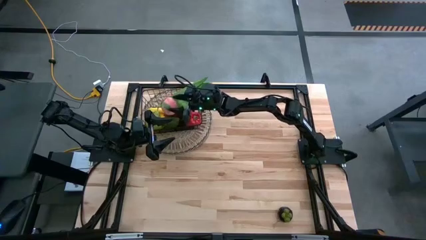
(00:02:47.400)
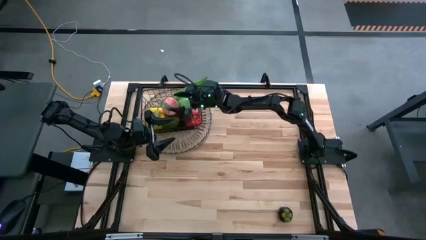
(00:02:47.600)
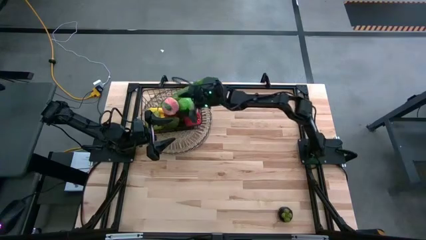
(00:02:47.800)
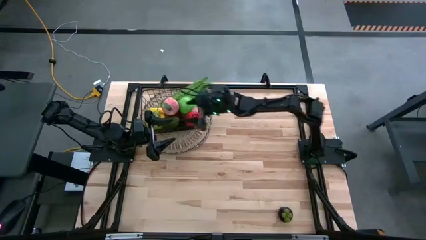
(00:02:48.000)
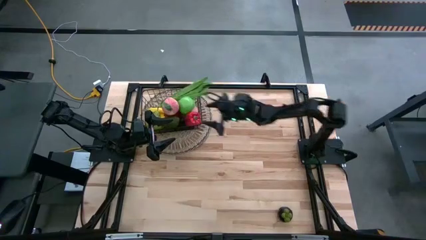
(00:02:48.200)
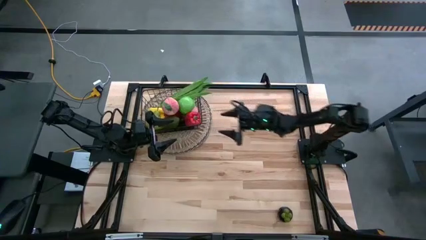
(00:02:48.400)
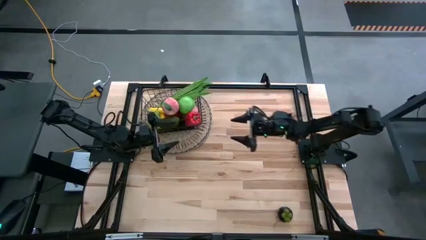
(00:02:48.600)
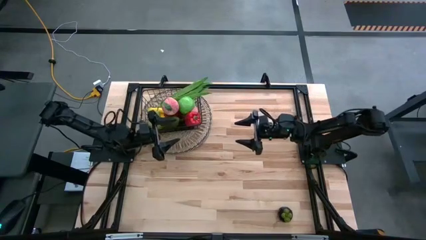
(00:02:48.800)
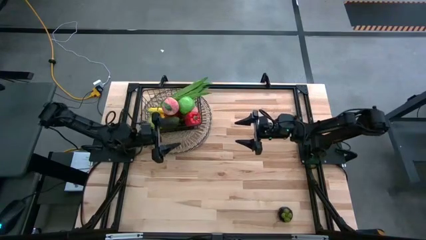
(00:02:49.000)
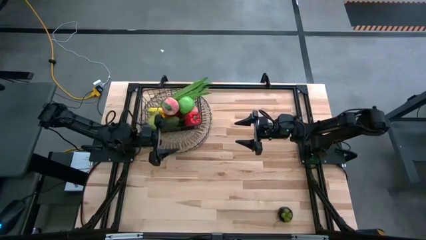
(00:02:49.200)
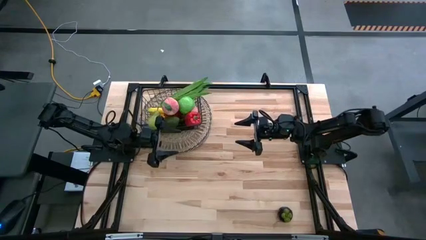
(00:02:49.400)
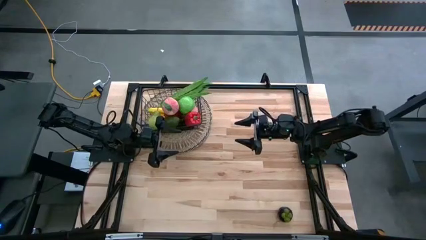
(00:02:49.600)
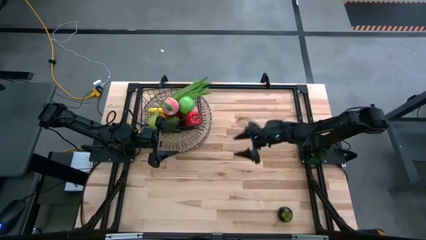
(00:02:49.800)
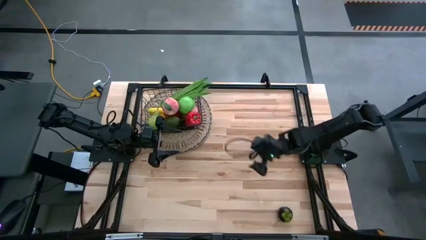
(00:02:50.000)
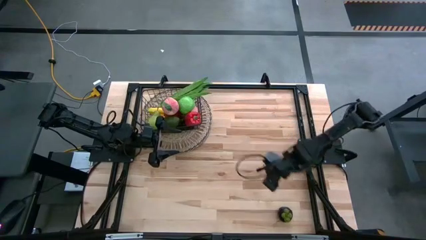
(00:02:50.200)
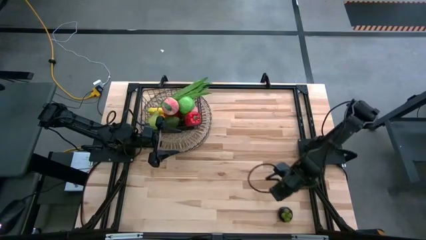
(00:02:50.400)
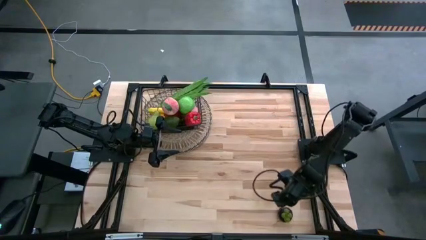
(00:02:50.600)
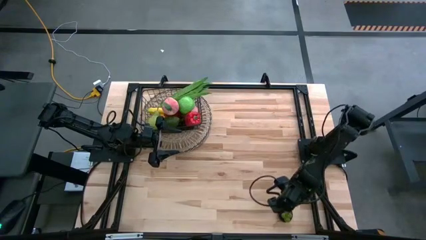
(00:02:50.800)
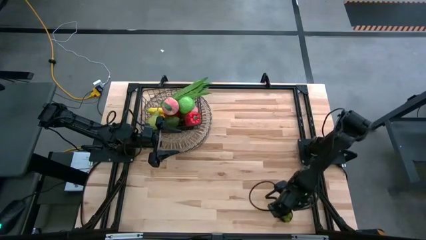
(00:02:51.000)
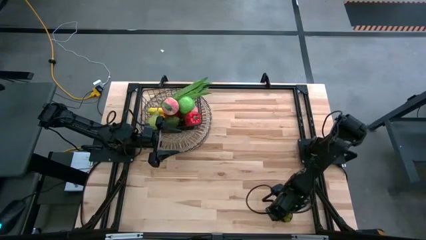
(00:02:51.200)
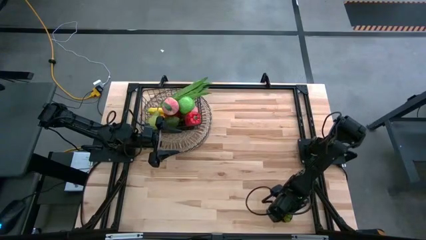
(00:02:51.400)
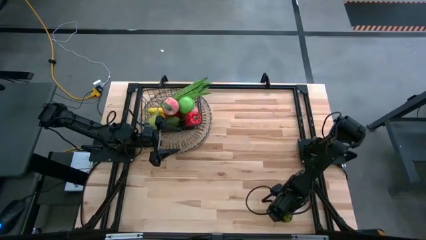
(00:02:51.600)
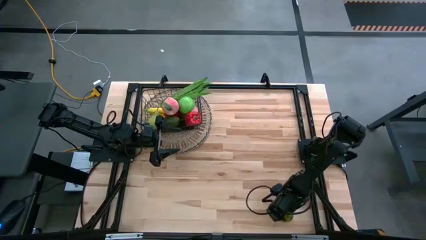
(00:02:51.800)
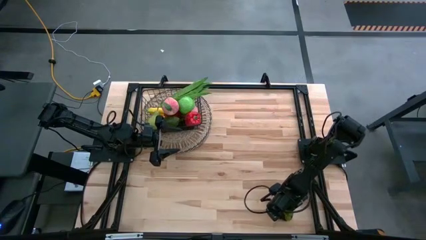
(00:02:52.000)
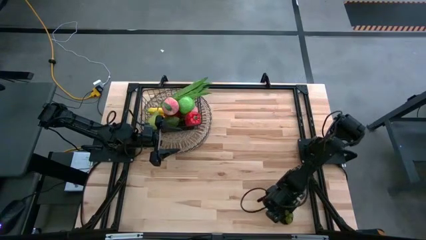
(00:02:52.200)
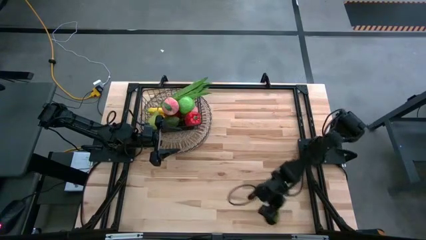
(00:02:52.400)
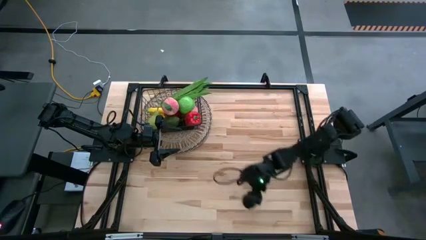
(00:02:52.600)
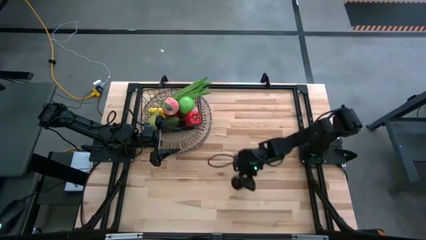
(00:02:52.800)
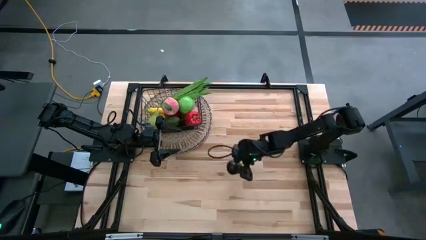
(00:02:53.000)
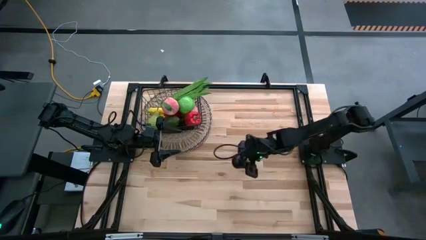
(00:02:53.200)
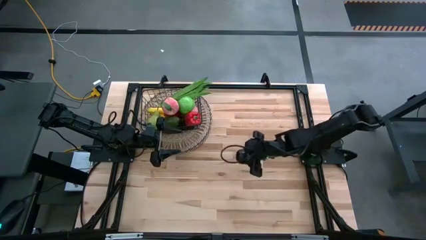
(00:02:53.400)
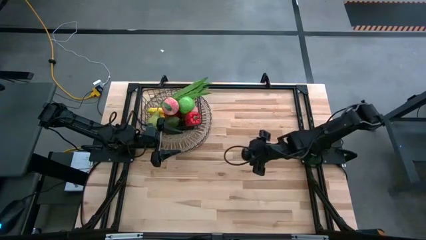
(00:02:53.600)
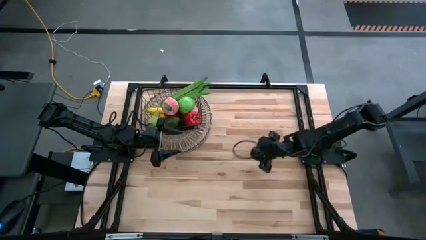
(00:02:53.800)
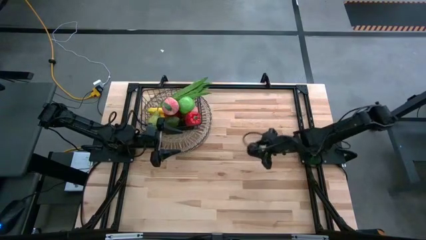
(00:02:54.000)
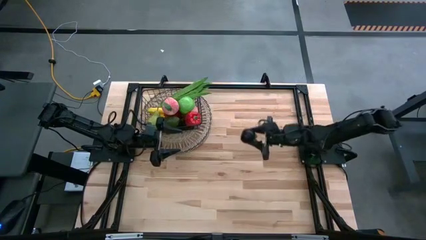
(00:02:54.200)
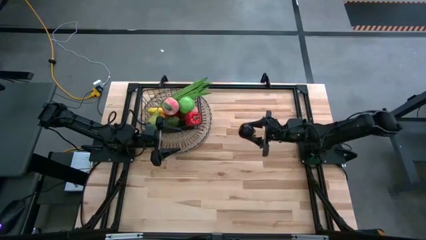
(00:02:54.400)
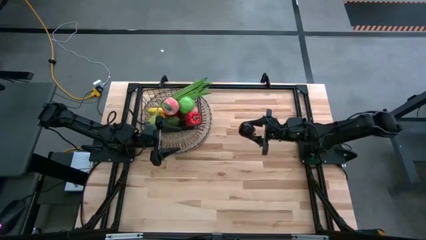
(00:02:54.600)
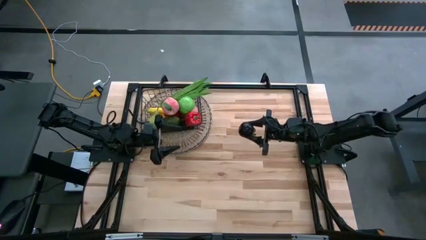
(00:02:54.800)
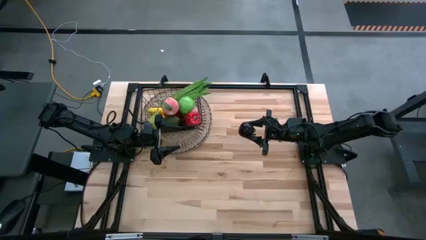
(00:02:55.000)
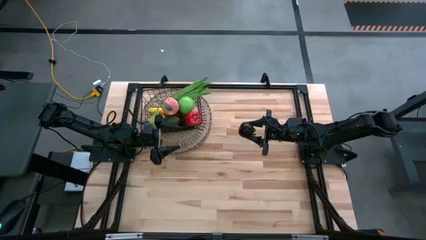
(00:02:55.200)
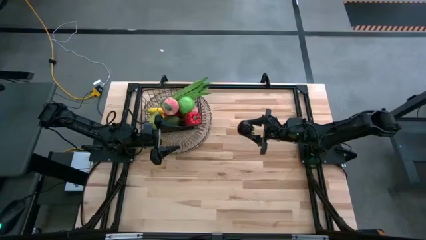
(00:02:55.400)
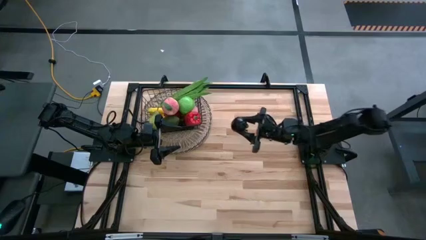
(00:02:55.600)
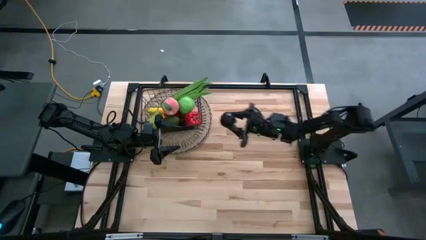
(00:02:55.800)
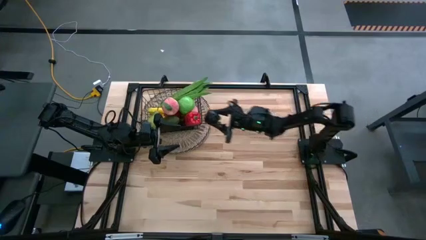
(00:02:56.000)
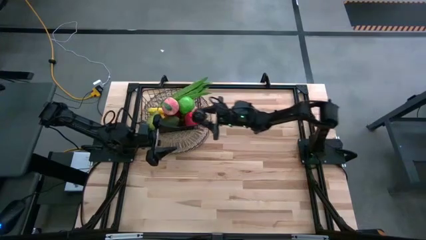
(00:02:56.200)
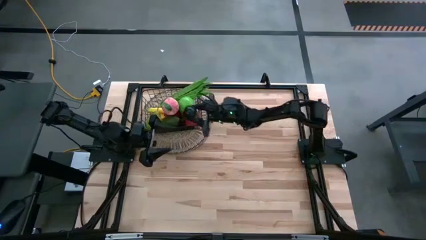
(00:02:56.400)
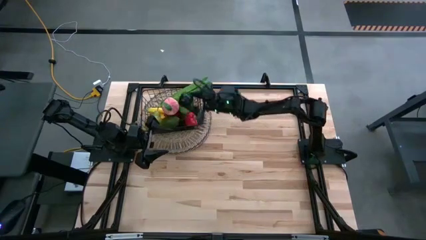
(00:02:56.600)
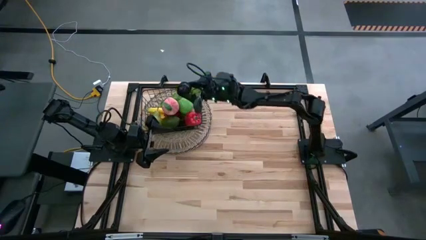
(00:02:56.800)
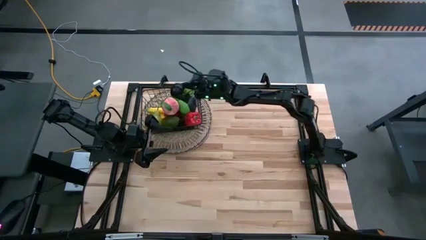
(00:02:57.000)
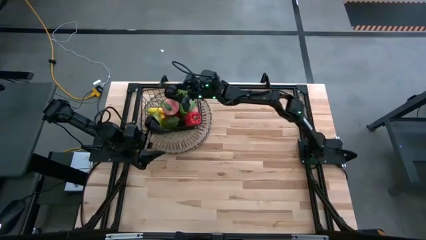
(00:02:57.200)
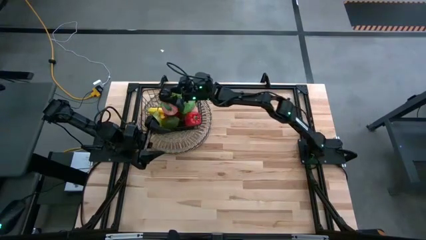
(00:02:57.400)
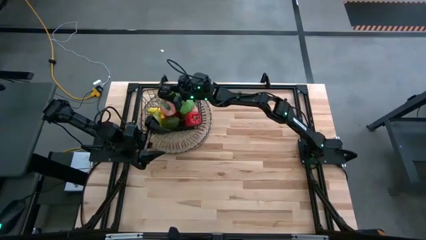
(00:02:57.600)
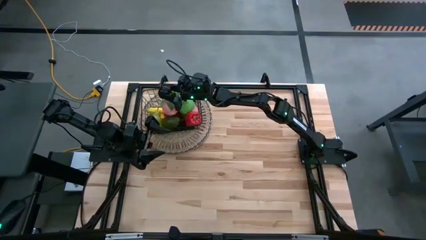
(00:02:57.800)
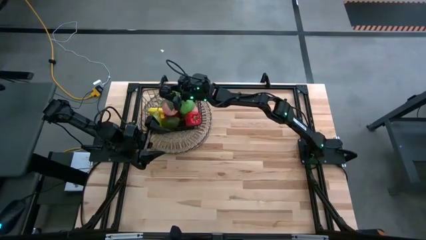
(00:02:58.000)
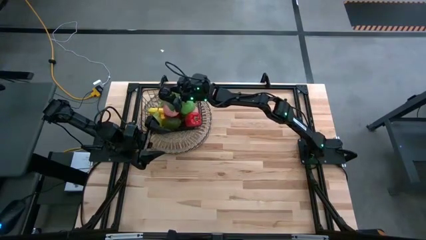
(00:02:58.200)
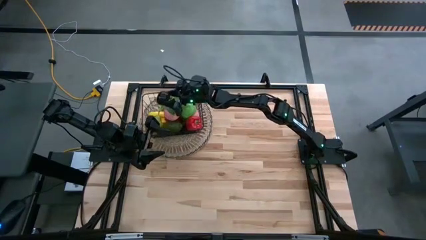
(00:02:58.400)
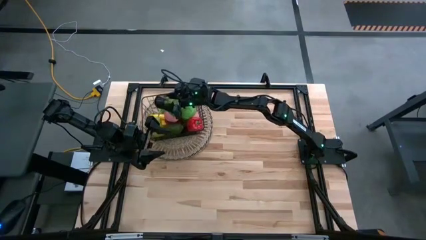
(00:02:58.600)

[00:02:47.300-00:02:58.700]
Task: Build produce basket
Put the black mangosteen into the wire basket
